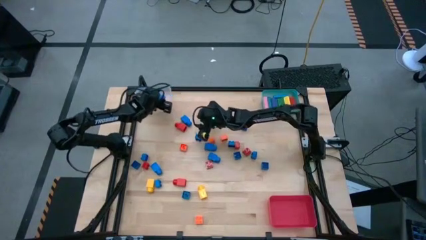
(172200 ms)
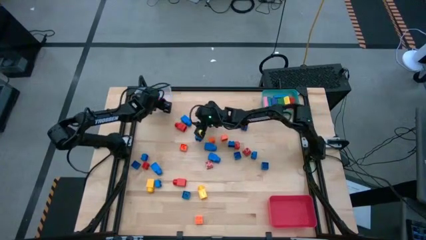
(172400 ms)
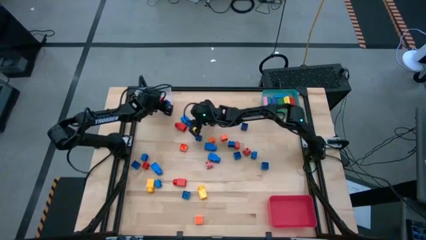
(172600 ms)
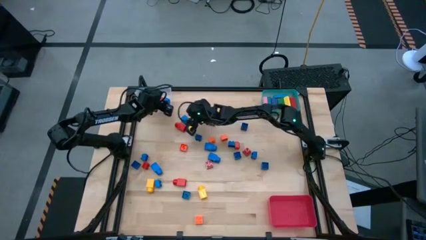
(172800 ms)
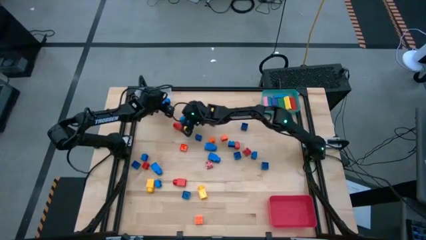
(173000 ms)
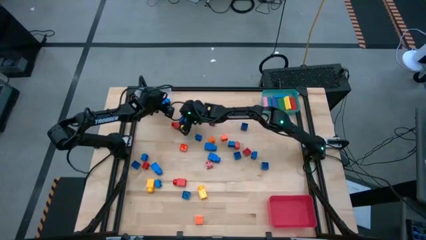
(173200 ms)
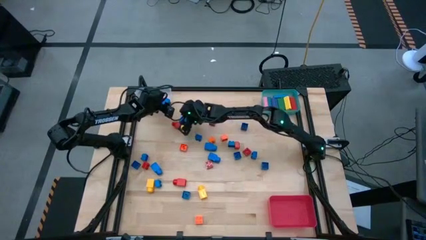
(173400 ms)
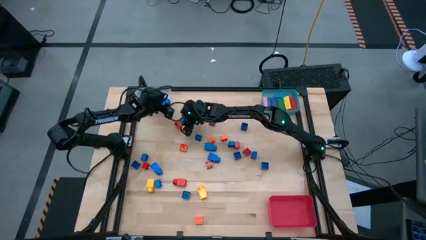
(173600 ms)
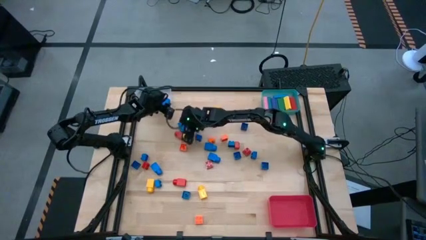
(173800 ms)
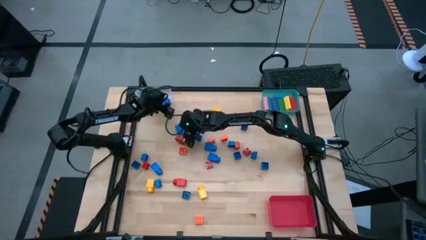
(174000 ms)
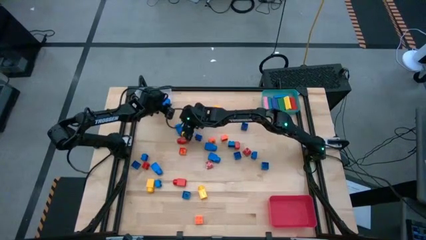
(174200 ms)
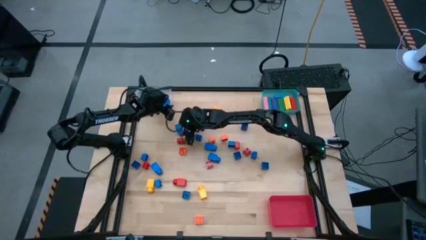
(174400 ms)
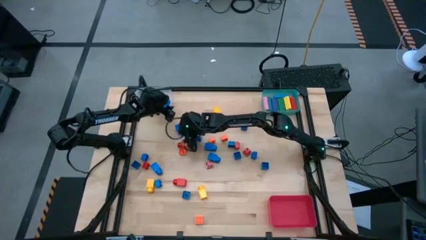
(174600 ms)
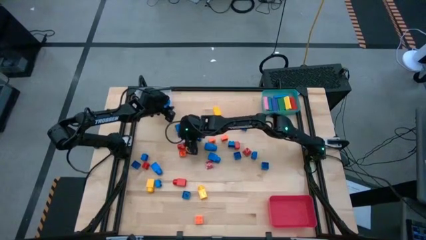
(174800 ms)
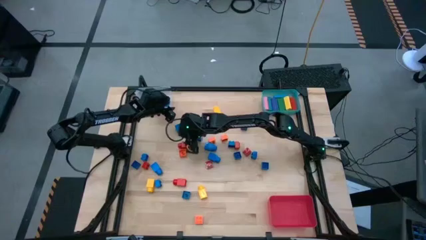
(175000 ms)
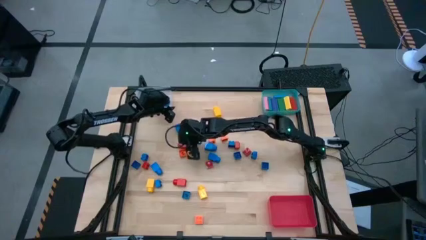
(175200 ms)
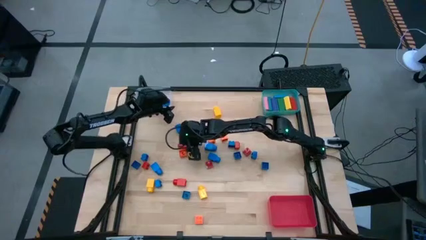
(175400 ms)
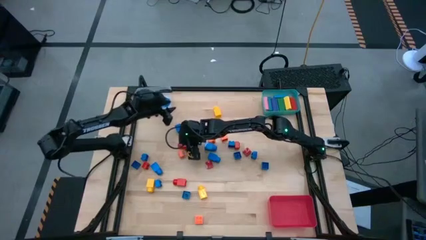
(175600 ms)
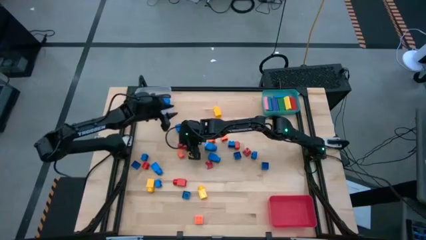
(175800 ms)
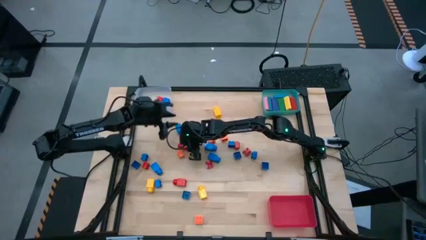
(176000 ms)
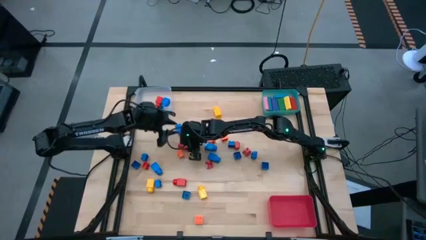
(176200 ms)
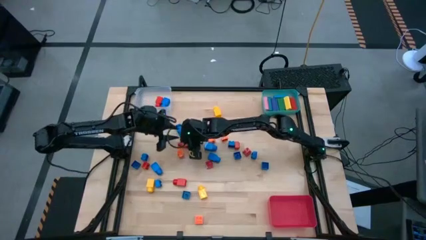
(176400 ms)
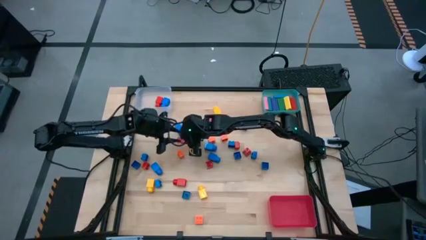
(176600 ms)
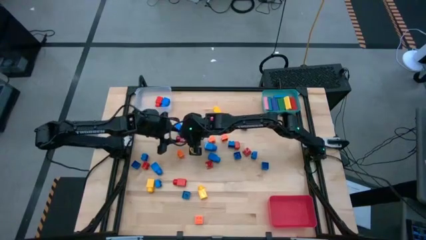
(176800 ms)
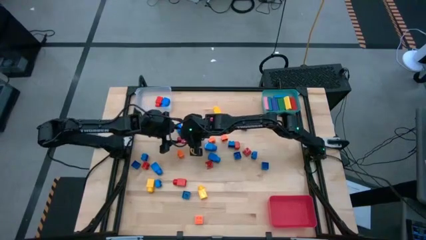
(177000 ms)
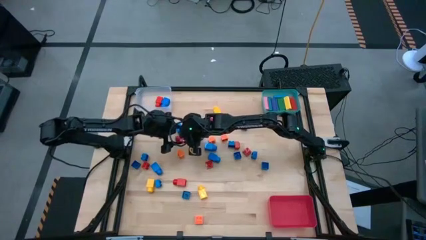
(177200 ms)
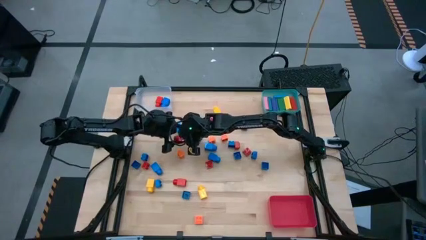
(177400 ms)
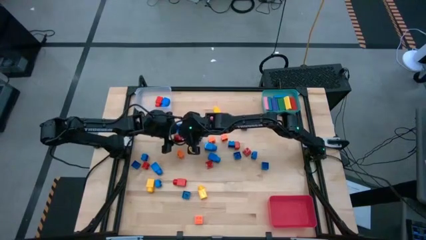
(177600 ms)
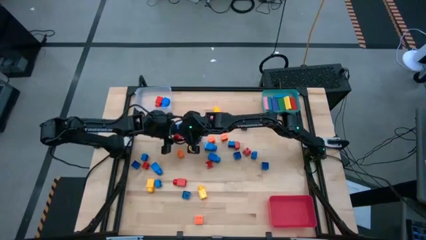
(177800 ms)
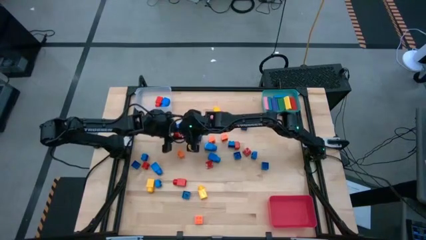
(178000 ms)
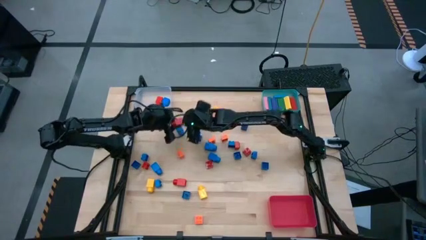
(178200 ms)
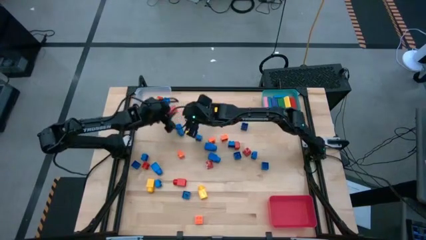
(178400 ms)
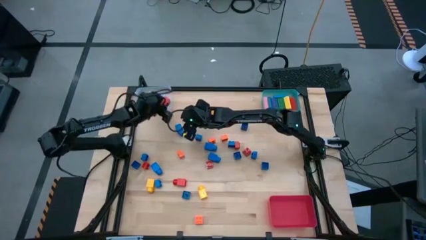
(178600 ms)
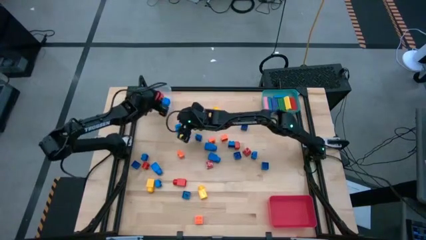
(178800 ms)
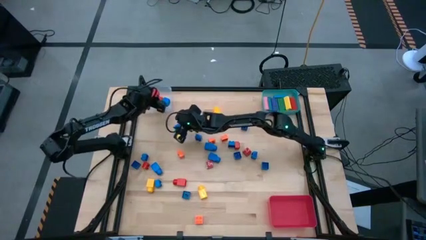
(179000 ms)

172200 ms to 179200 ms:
Task: Sort blocks by size
Put the big red game piece into the transparent bin

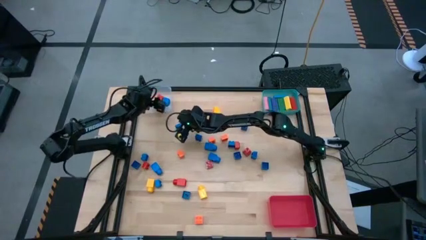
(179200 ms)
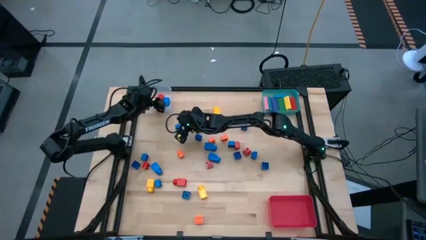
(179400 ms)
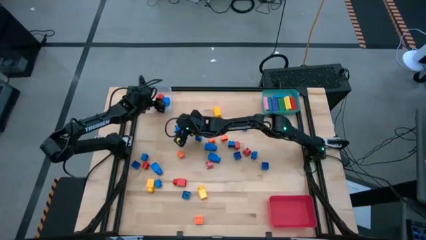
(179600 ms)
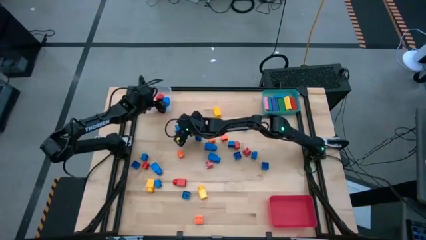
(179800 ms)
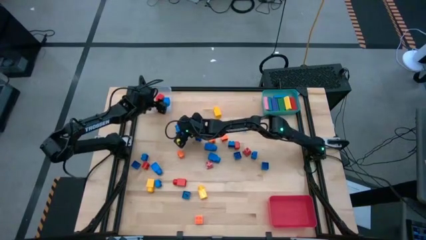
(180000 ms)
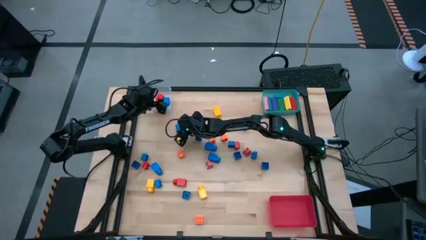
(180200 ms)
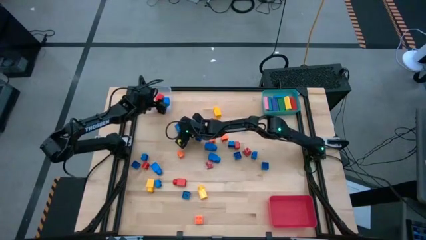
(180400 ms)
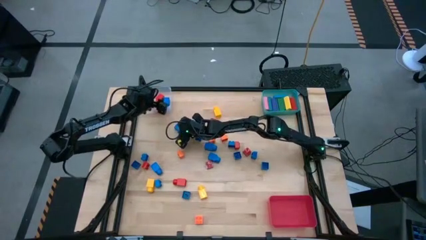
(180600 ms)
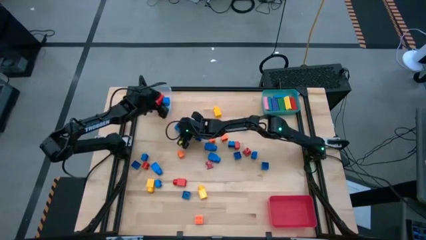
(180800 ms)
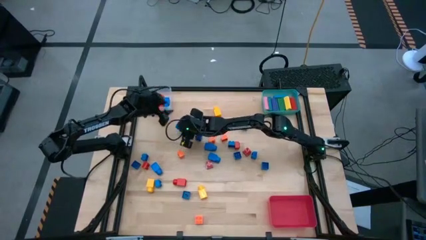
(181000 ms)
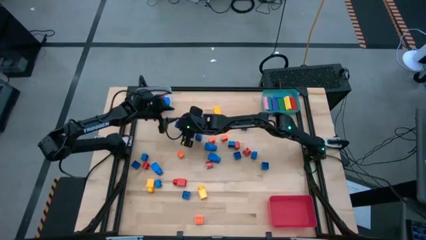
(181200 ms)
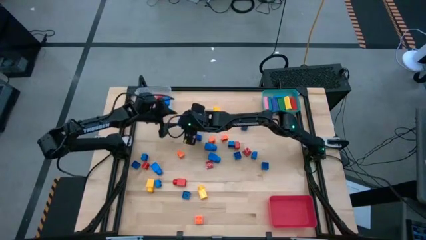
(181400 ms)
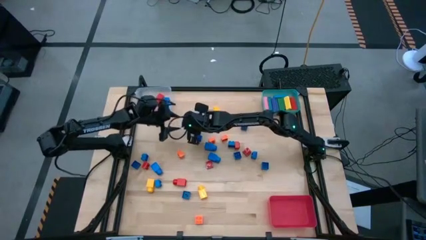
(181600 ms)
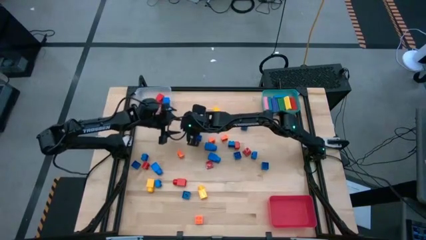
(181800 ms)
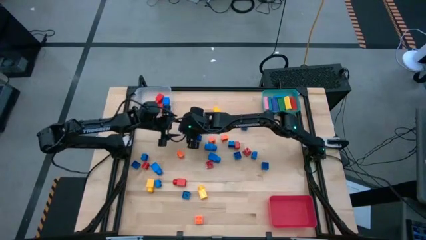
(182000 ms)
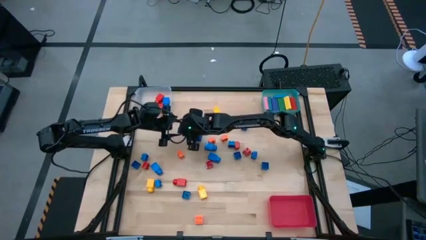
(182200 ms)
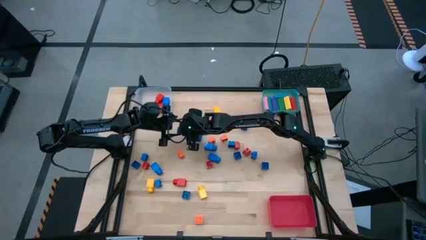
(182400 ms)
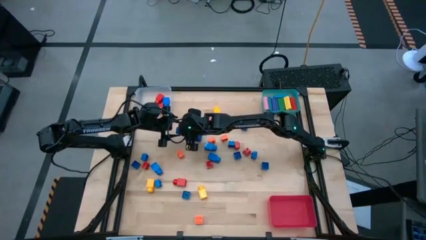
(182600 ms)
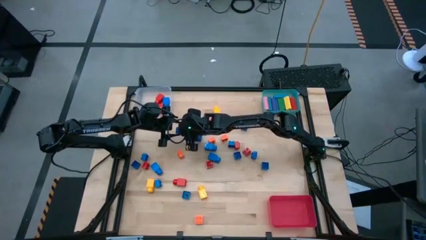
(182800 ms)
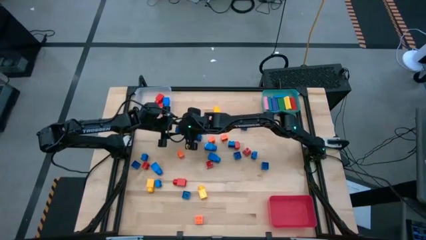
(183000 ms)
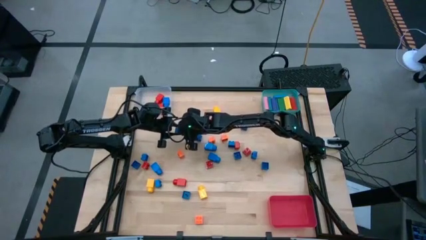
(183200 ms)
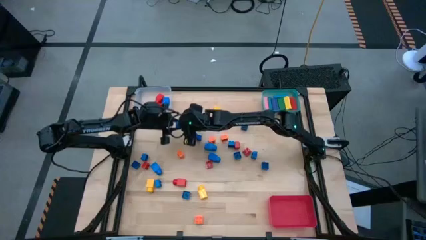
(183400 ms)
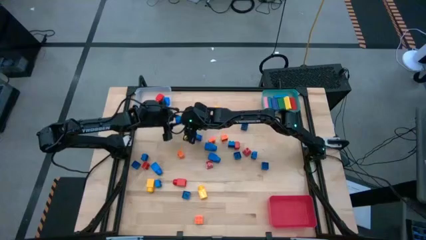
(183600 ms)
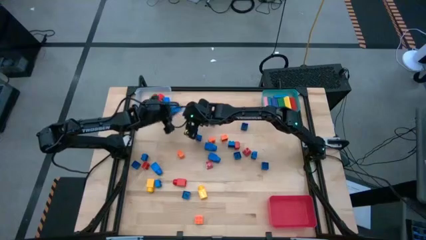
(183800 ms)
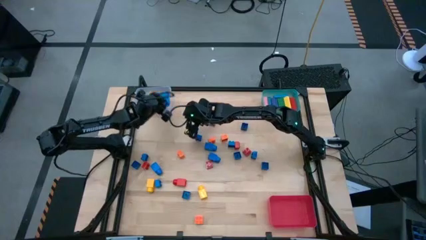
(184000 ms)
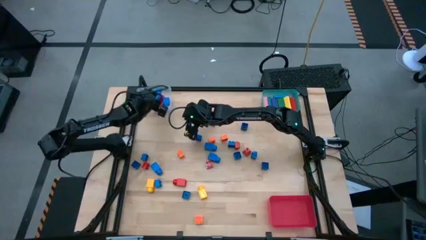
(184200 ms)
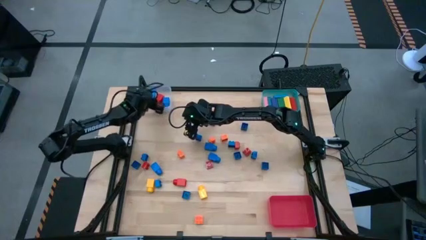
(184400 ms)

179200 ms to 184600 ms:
Put the big blue game piece into the transparent bin

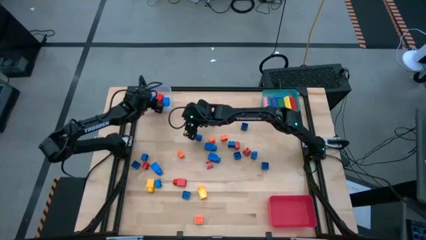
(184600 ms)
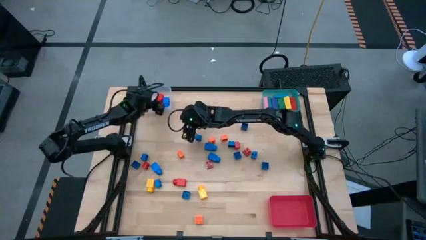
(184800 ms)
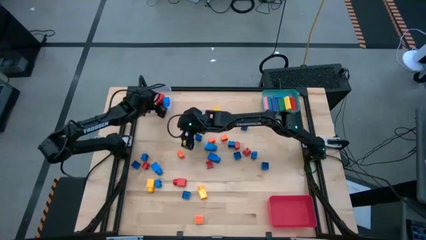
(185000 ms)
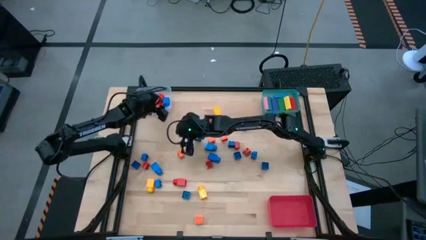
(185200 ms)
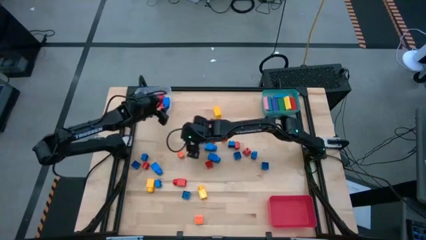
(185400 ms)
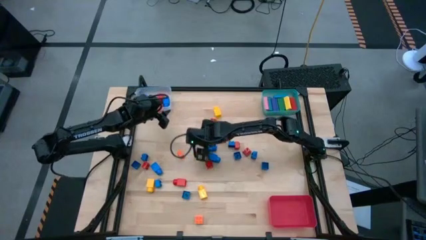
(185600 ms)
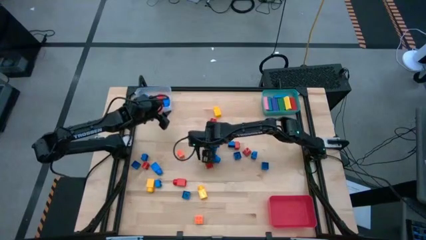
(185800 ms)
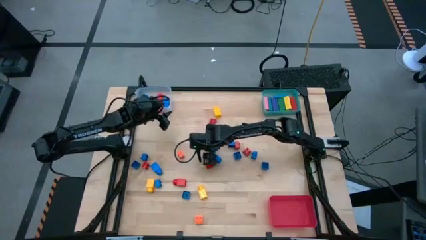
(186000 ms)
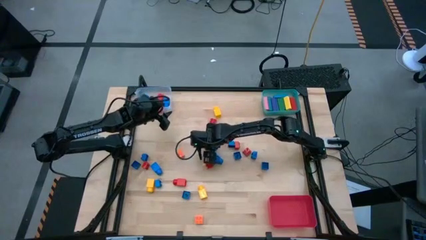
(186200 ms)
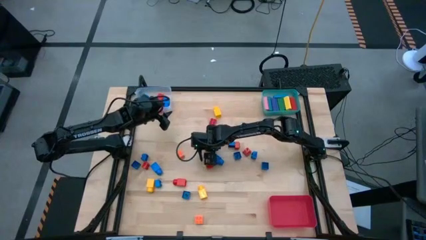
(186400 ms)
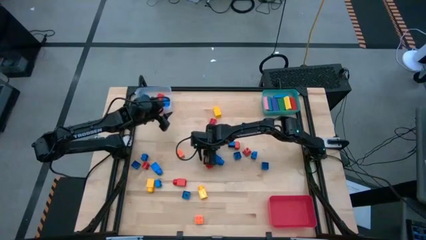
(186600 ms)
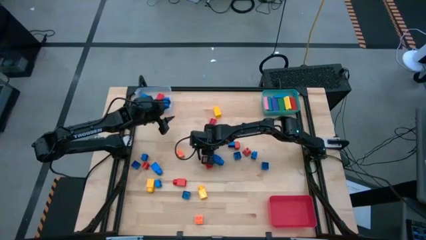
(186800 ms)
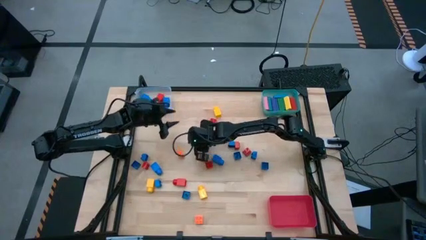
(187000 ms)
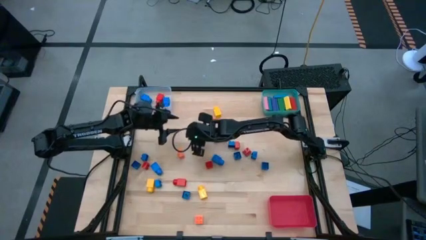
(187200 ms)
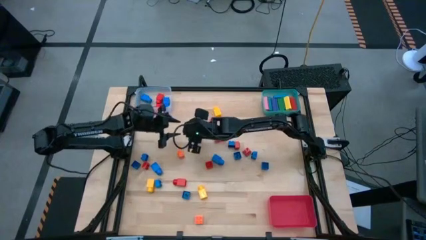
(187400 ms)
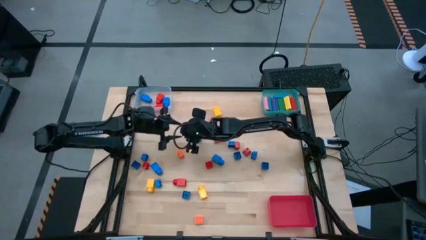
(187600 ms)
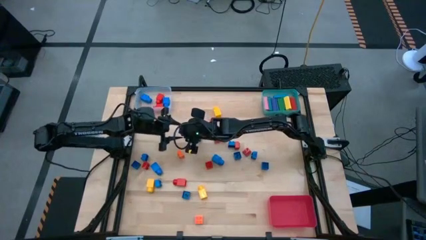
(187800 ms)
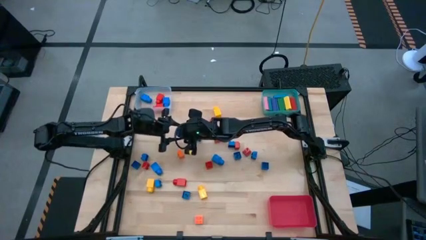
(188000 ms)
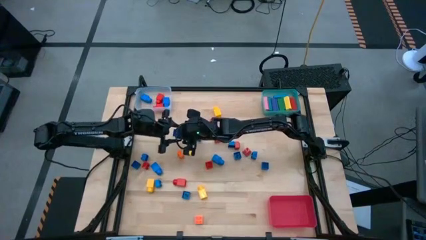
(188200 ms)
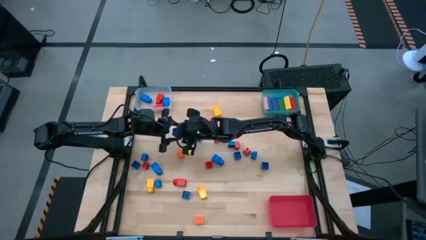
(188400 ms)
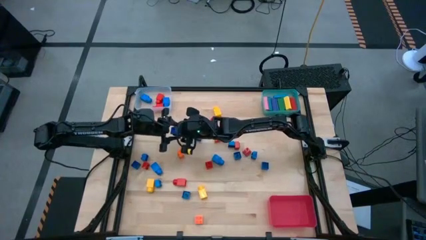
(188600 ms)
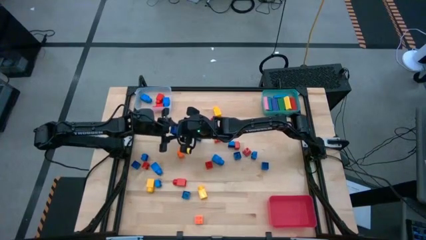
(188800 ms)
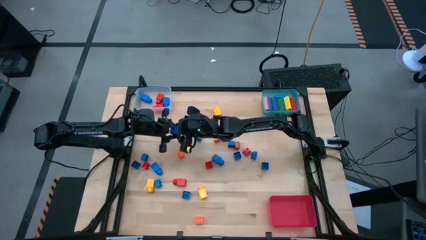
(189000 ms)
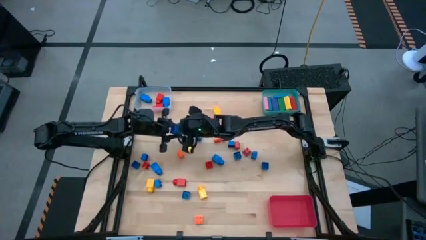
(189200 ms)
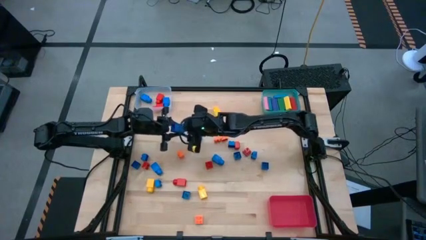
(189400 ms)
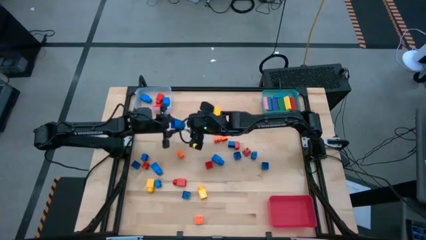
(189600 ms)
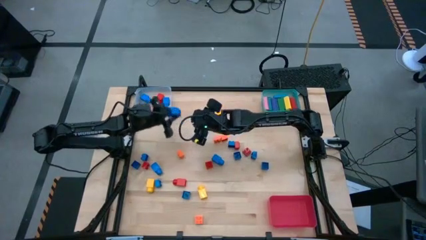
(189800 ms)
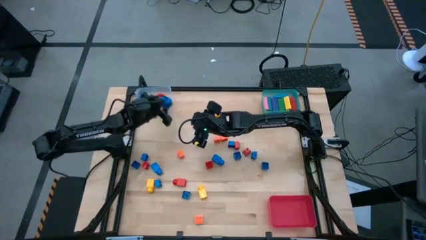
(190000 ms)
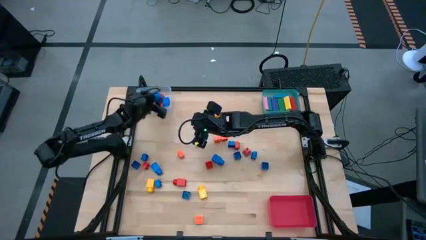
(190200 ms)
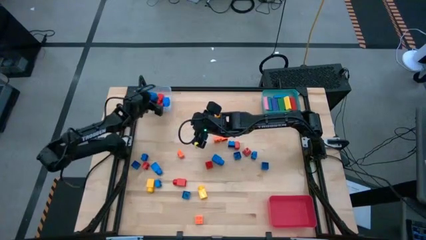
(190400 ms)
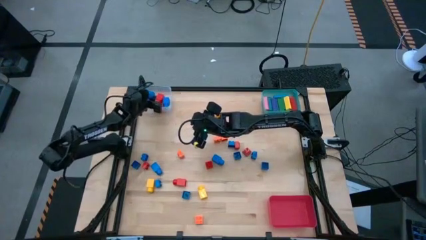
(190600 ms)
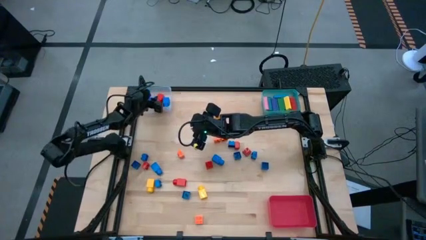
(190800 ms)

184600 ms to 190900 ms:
Put the big blue game piece into the transparent bin
